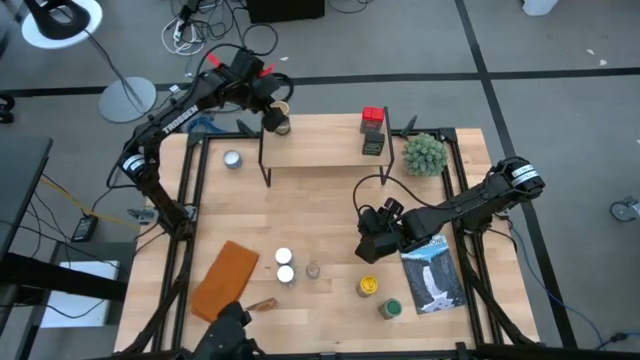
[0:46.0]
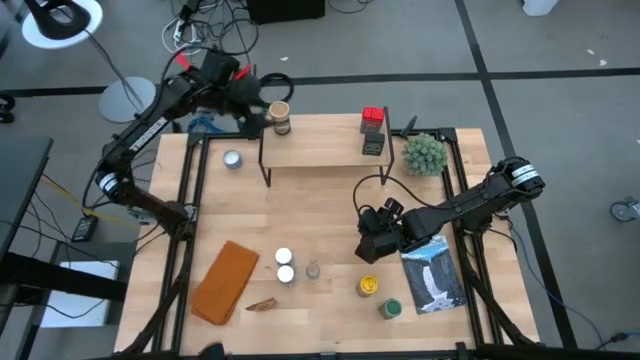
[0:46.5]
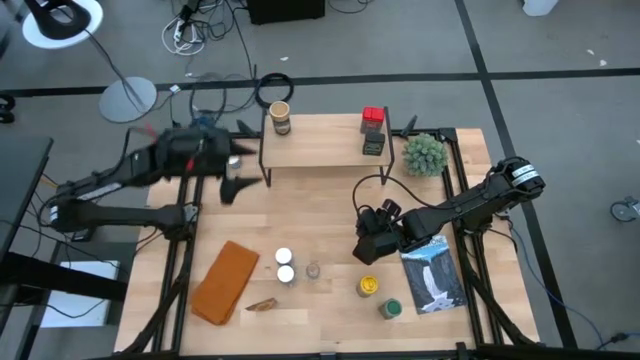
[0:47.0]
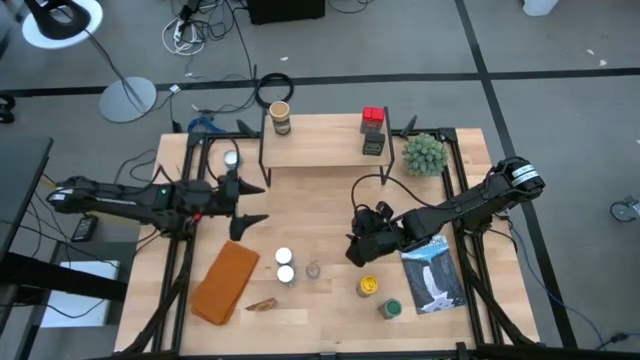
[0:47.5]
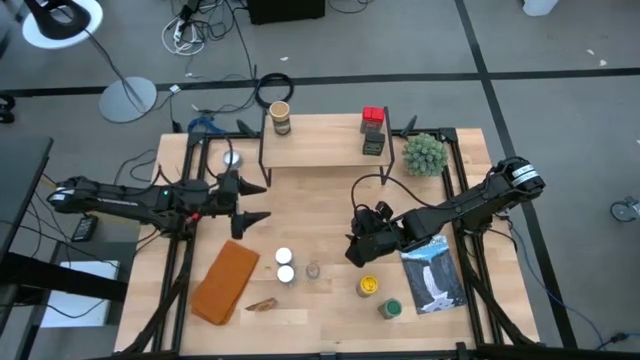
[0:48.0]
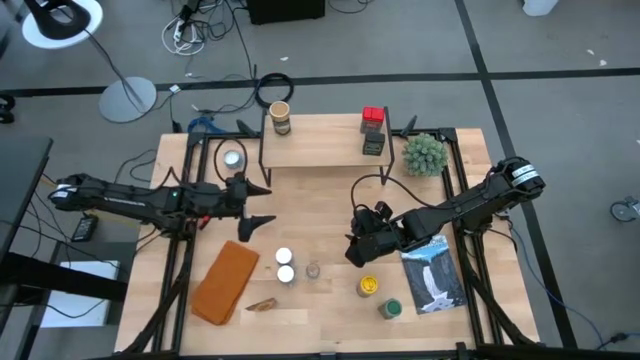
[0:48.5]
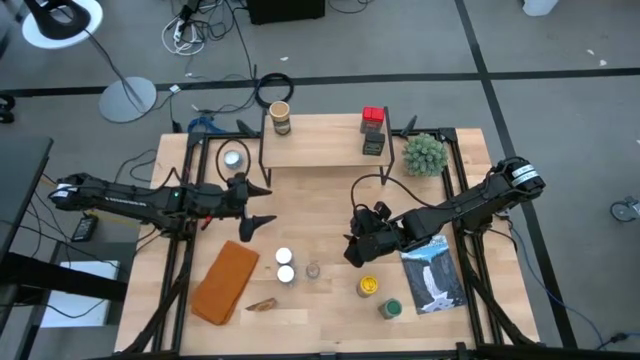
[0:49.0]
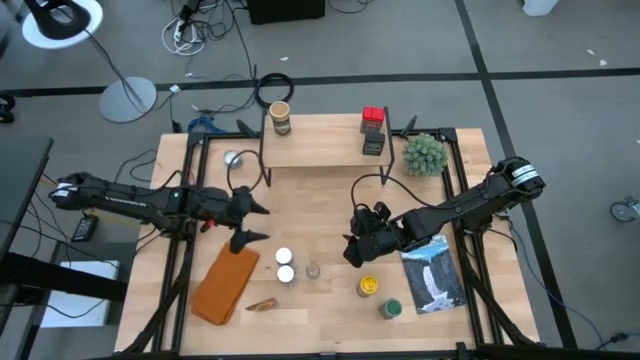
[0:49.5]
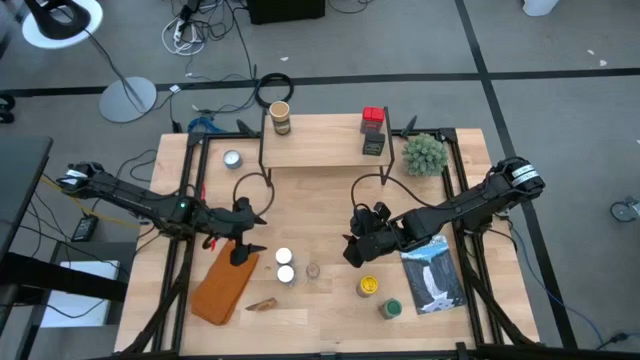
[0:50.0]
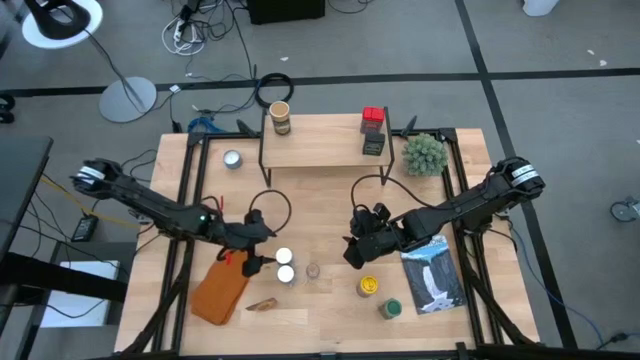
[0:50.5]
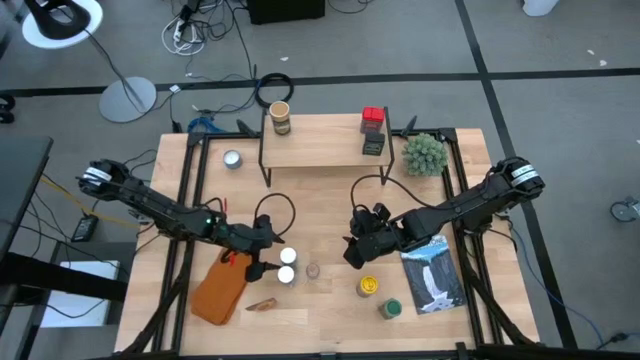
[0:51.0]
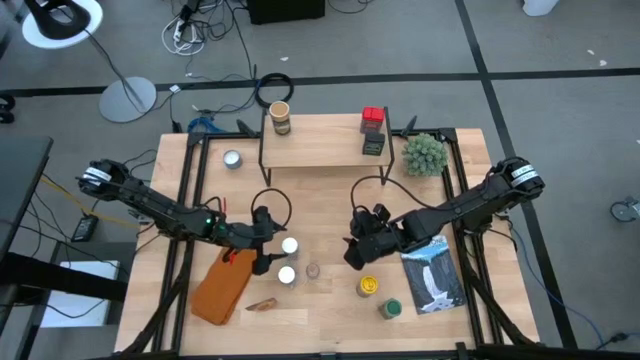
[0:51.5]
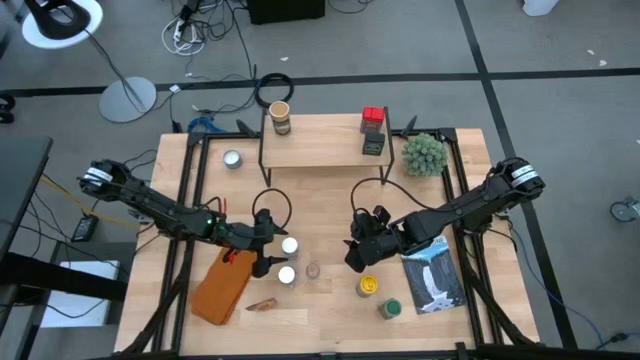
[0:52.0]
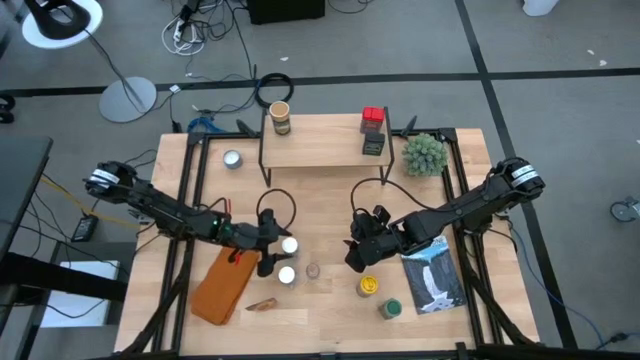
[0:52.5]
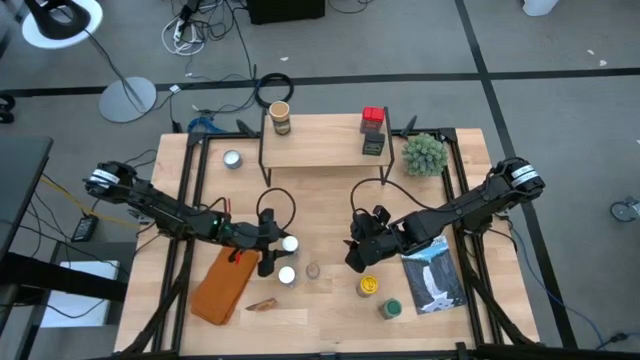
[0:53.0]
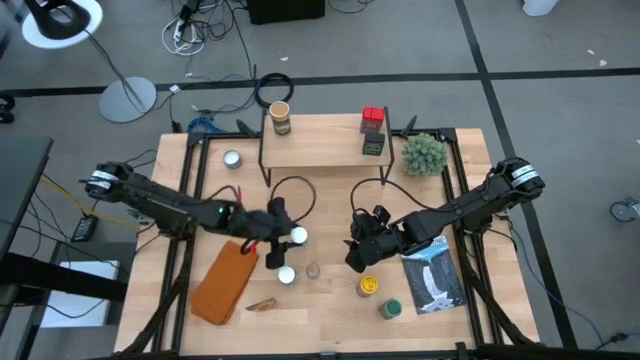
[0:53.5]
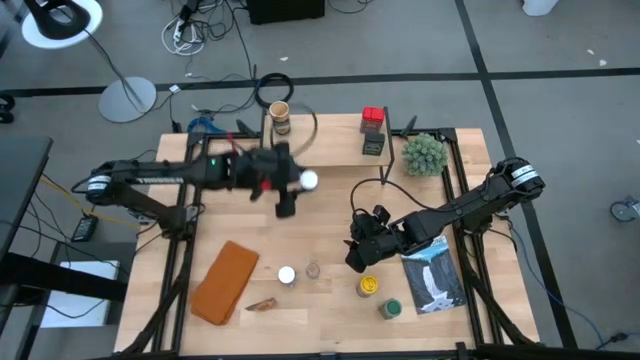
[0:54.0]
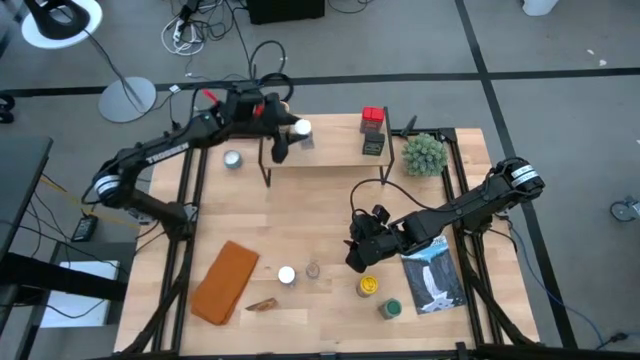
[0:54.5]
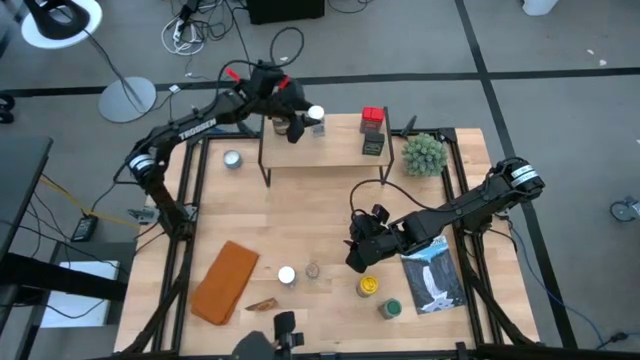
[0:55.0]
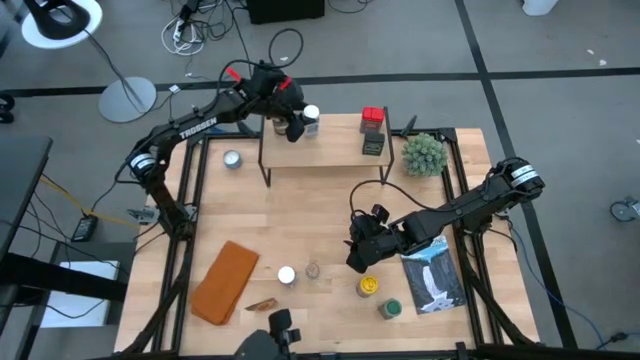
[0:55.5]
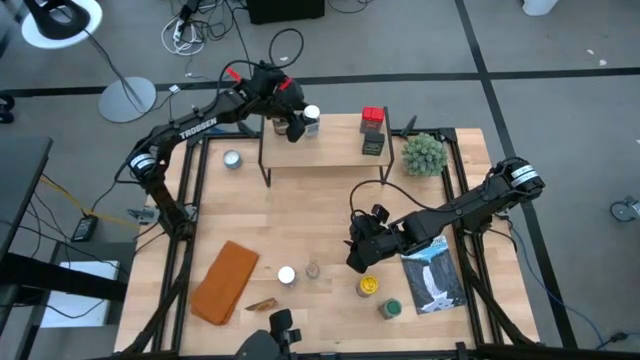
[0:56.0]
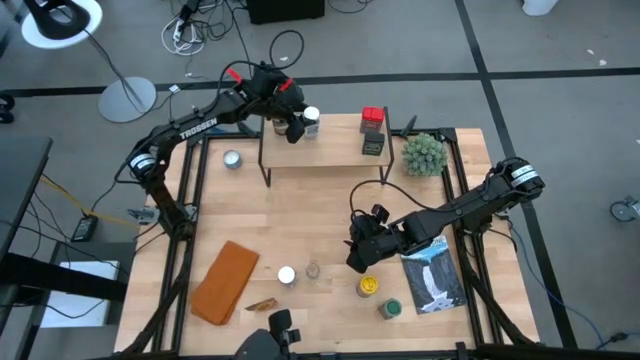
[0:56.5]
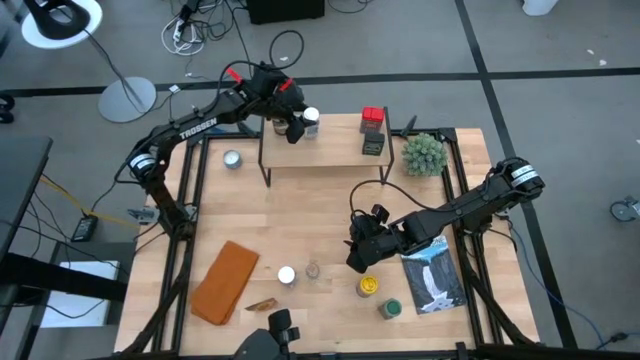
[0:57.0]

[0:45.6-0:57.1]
Task: Shelf spices
Put the white seasoning bottle on the shelf

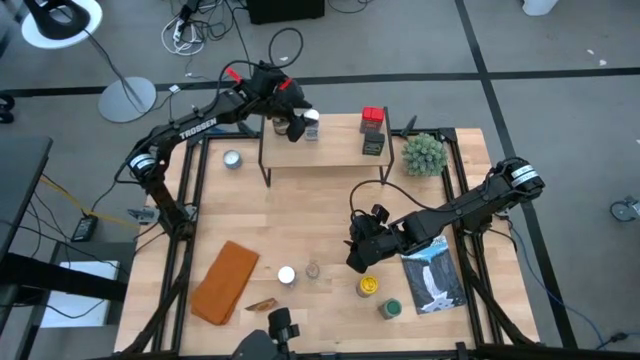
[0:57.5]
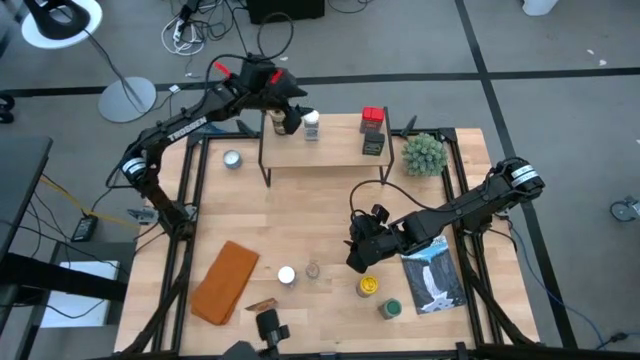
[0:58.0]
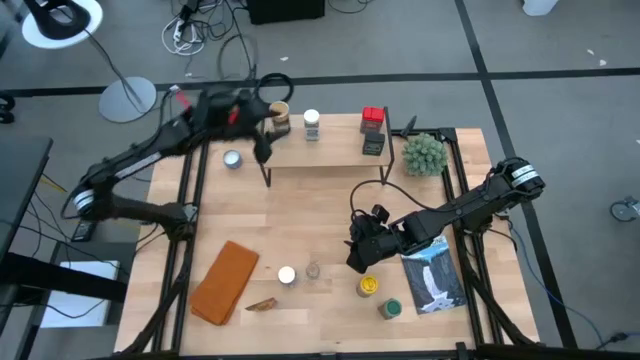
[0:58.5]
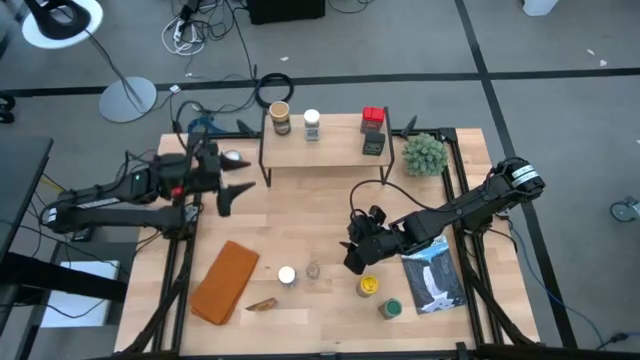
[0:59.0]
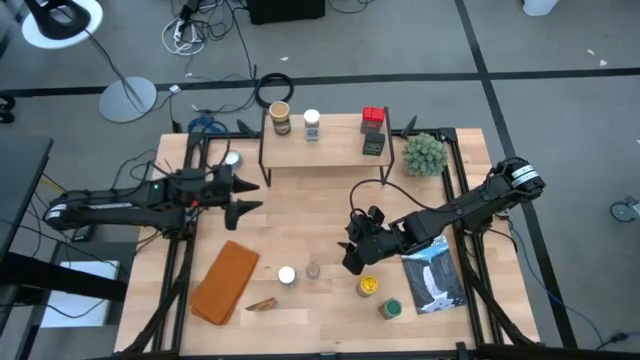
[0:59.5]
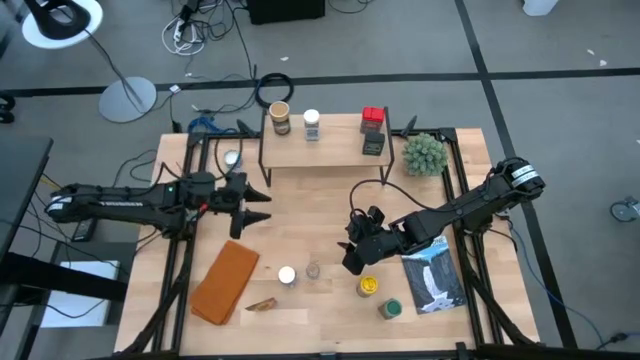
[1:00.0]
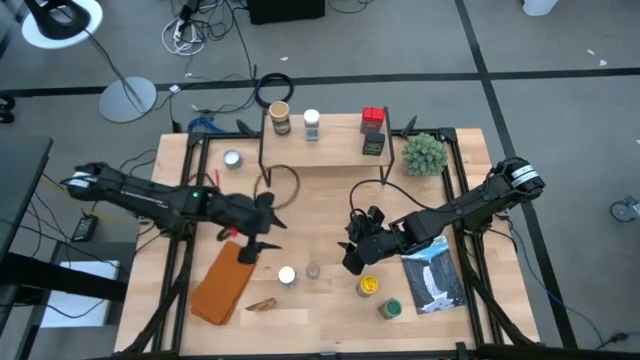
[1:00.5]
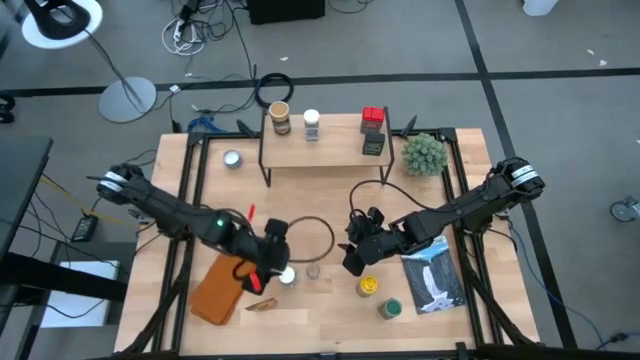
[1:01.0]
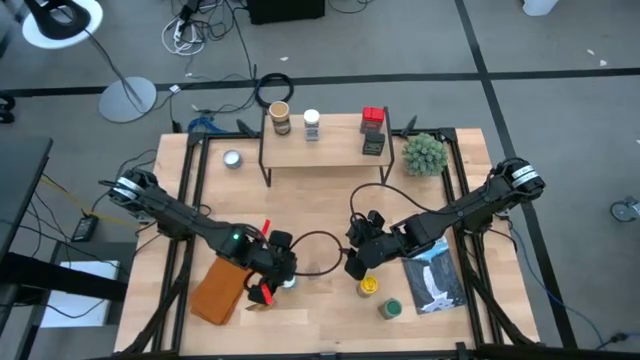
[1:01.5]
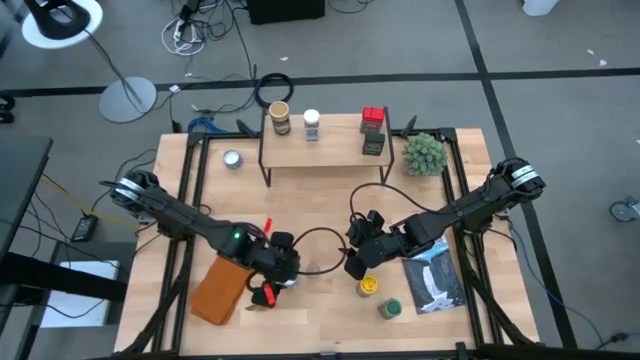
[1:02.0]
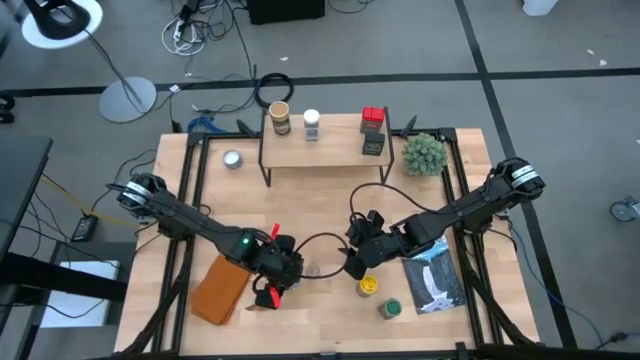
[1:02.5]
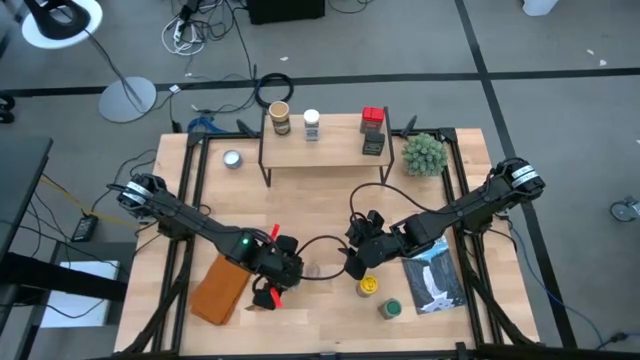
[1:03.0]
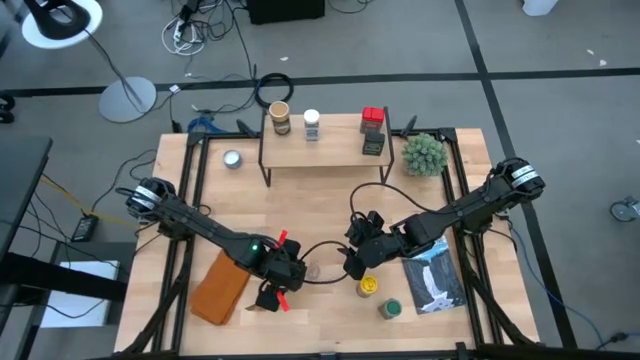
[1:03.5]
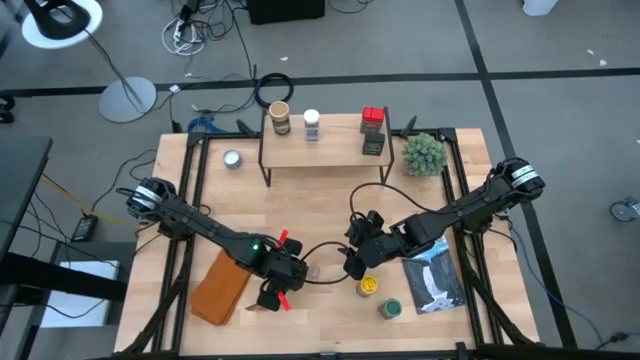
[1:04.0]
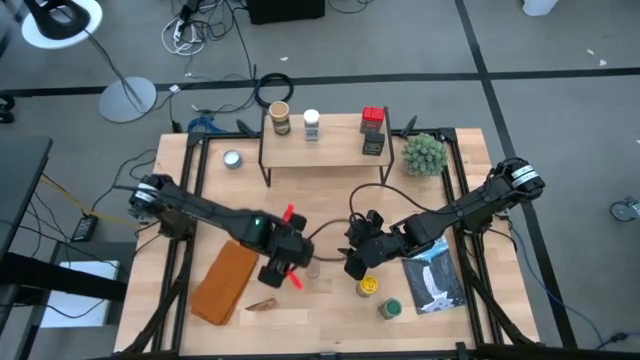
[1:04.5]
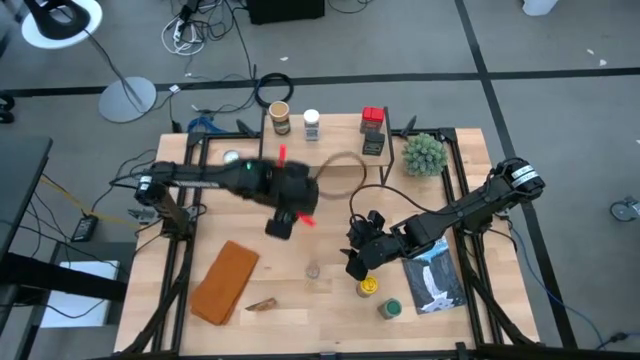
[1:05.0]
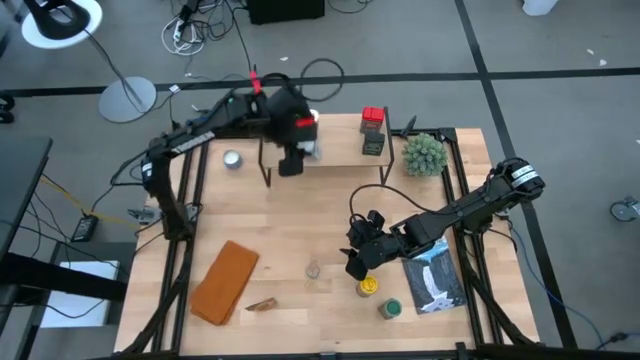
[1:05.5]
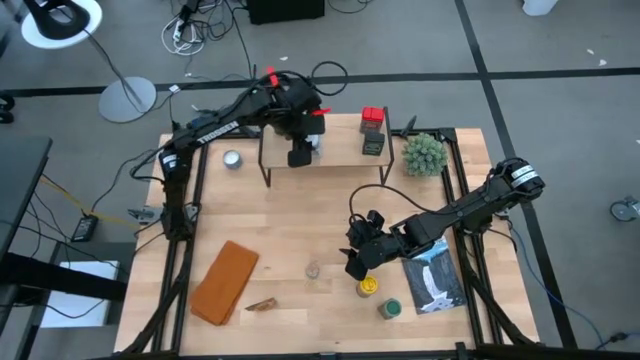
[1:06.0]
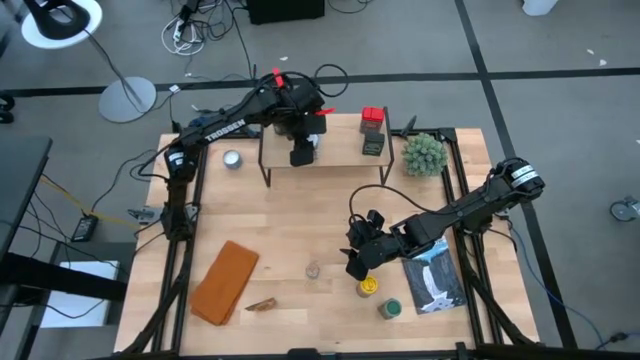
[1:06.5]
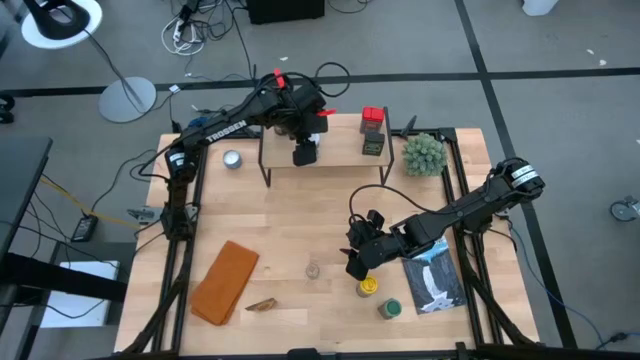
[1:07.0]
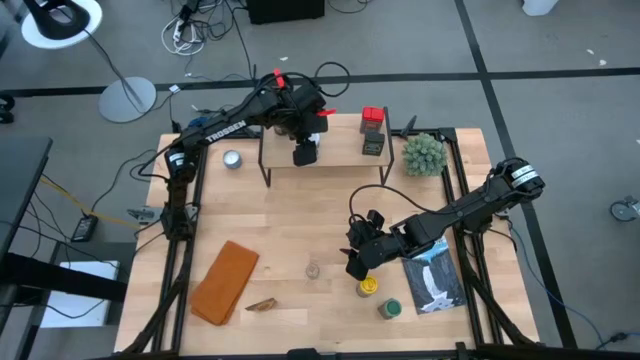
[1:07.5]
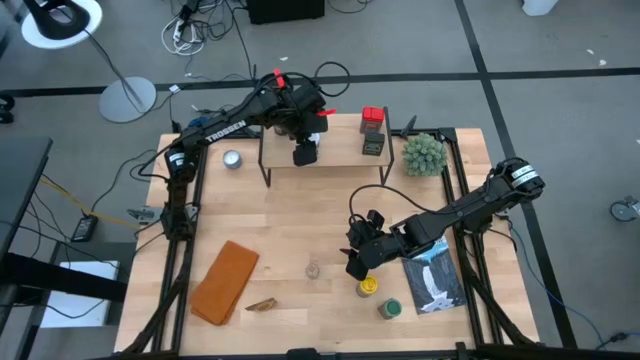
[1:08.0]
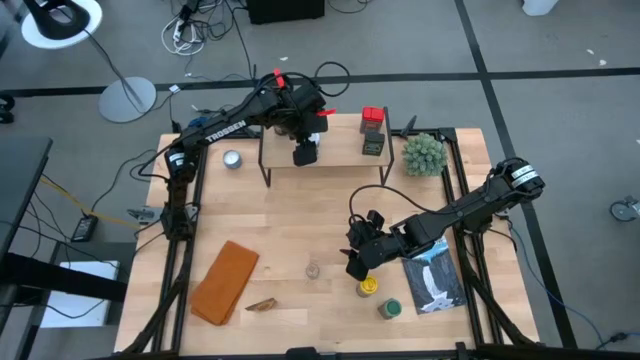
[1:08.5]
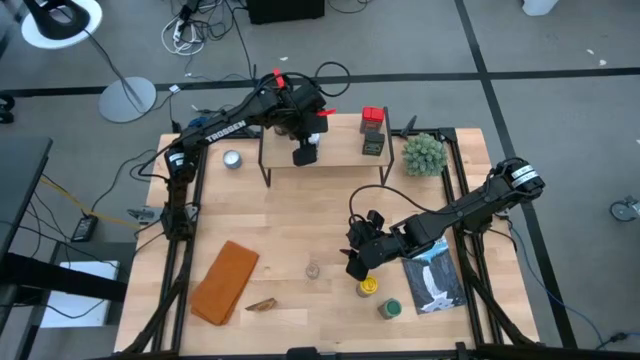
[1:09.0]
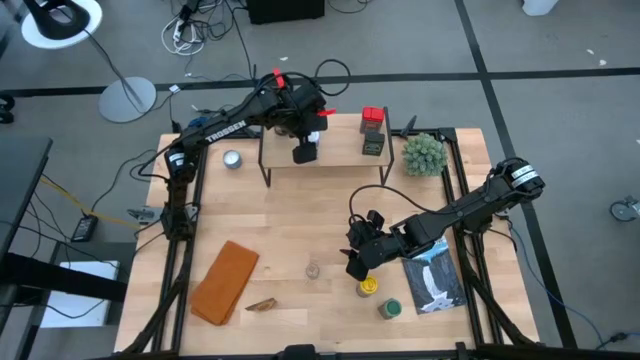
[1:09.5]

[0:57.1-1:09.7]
Put the white seasoning bottle on the shelf
